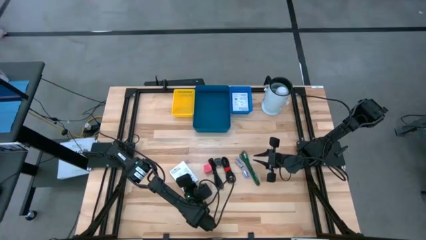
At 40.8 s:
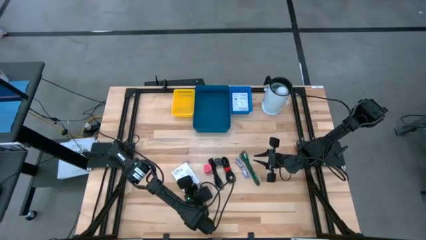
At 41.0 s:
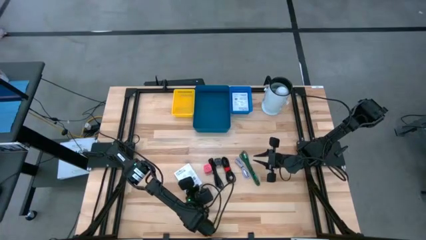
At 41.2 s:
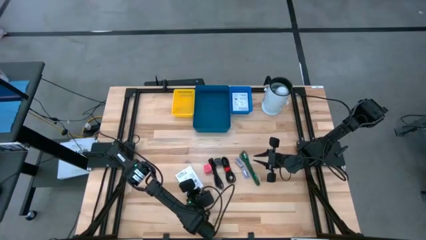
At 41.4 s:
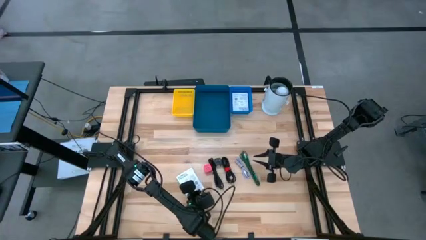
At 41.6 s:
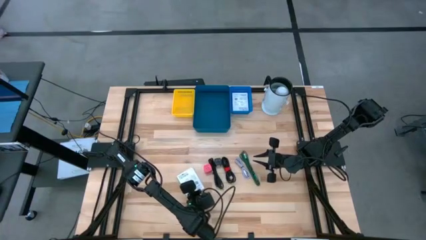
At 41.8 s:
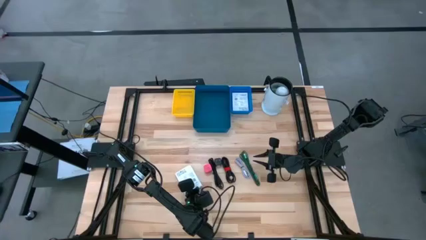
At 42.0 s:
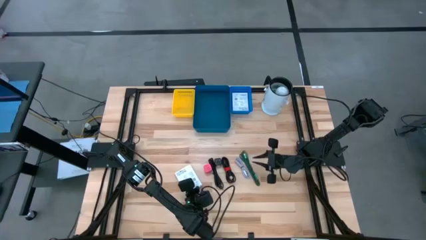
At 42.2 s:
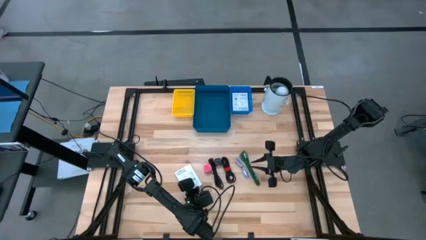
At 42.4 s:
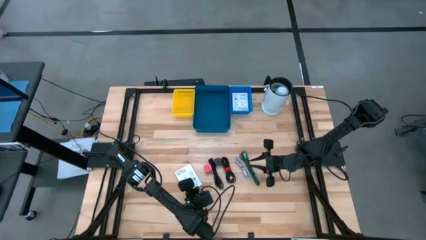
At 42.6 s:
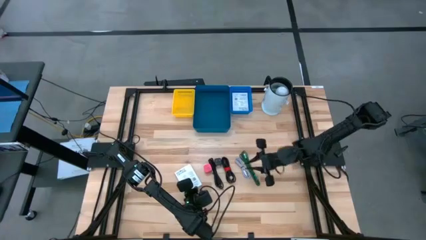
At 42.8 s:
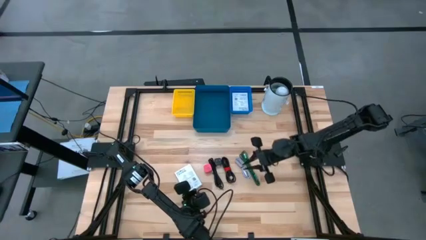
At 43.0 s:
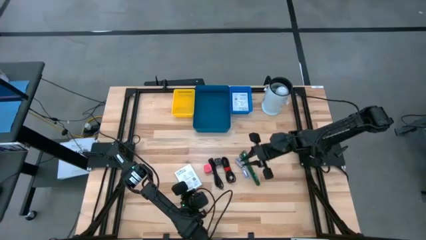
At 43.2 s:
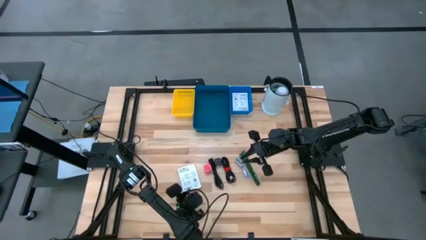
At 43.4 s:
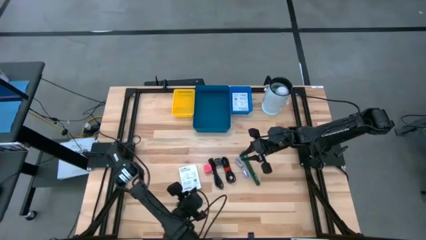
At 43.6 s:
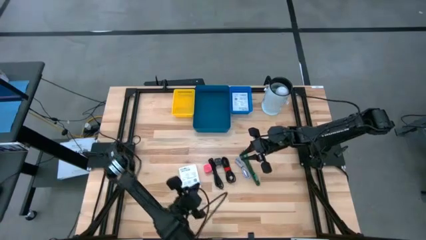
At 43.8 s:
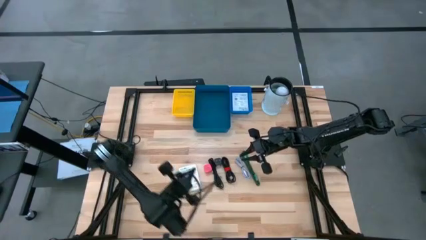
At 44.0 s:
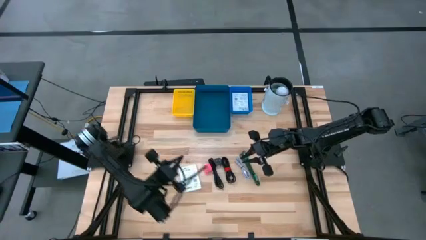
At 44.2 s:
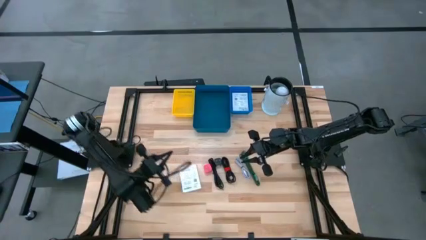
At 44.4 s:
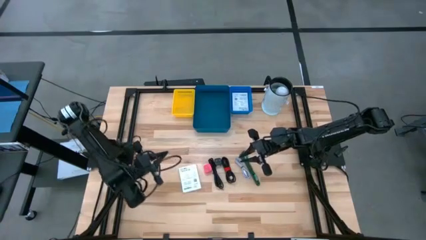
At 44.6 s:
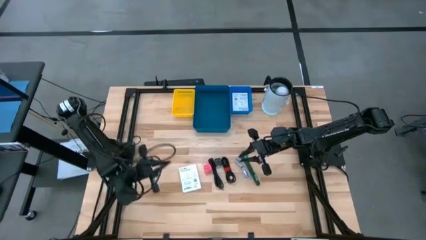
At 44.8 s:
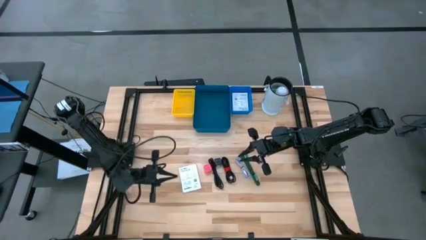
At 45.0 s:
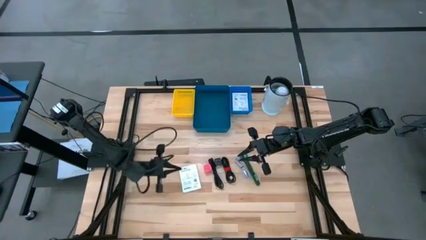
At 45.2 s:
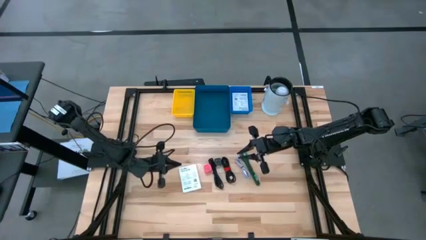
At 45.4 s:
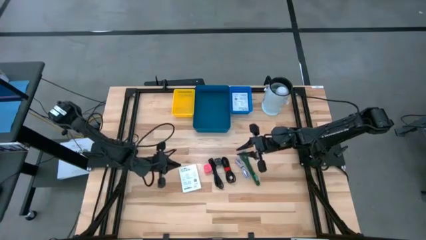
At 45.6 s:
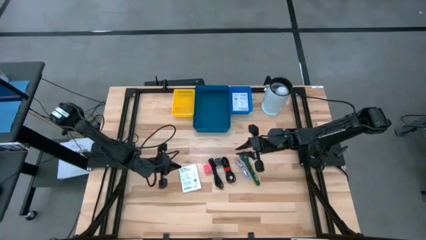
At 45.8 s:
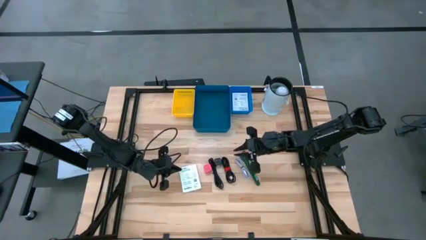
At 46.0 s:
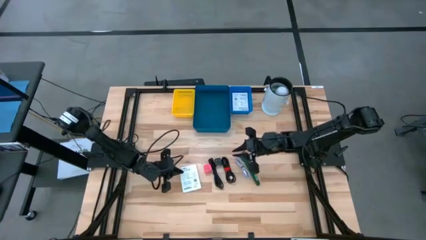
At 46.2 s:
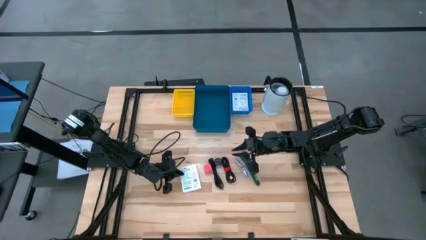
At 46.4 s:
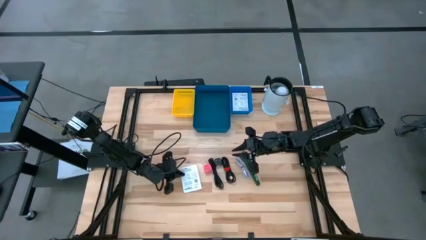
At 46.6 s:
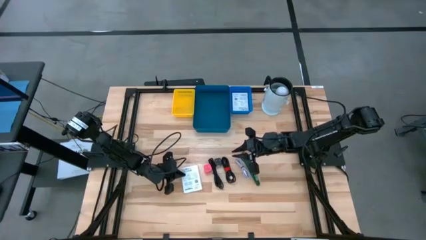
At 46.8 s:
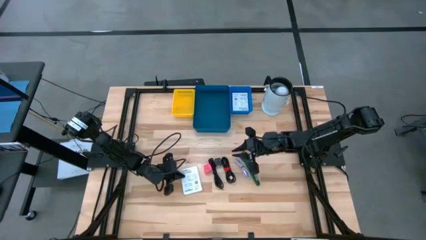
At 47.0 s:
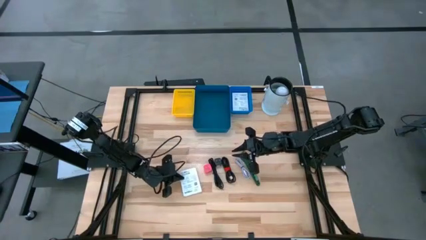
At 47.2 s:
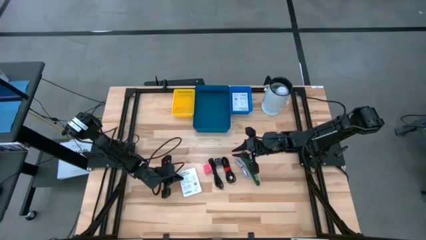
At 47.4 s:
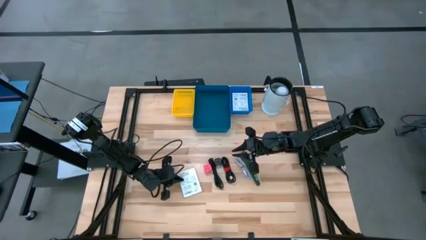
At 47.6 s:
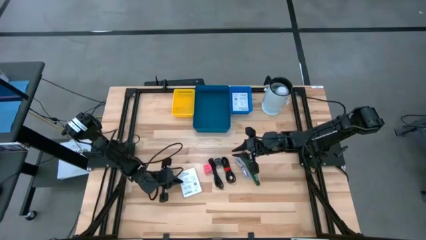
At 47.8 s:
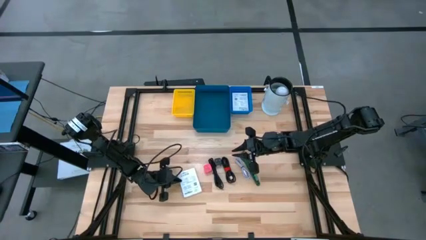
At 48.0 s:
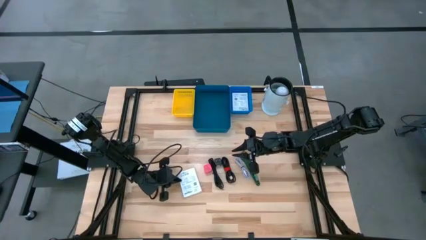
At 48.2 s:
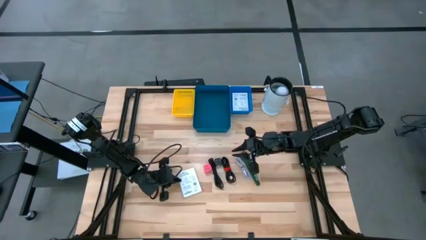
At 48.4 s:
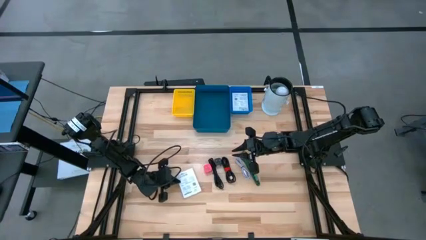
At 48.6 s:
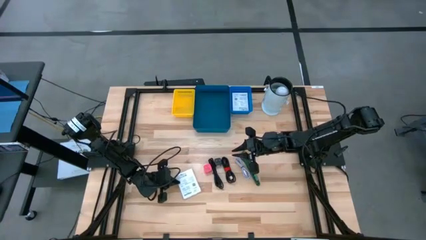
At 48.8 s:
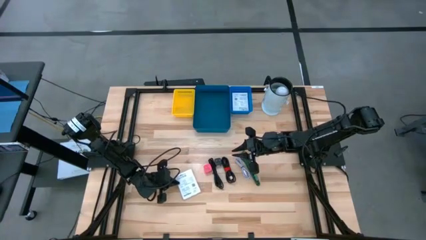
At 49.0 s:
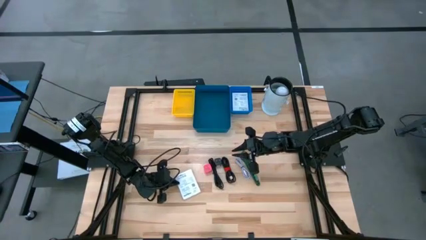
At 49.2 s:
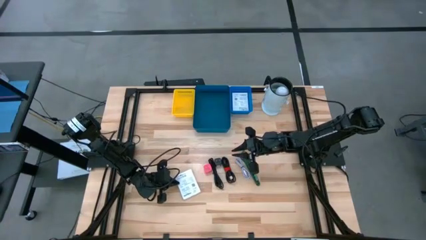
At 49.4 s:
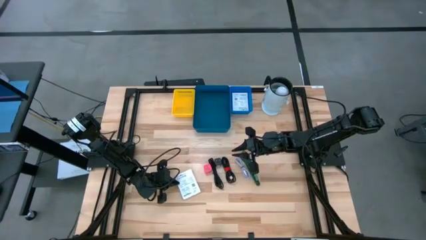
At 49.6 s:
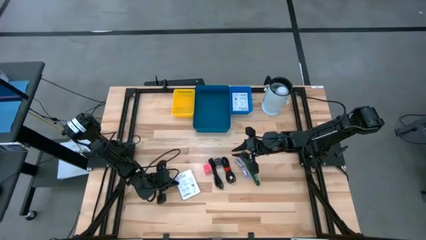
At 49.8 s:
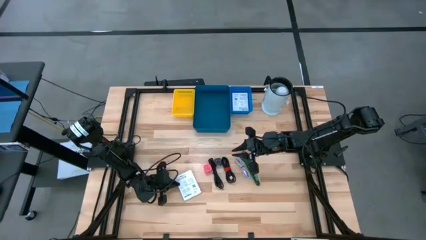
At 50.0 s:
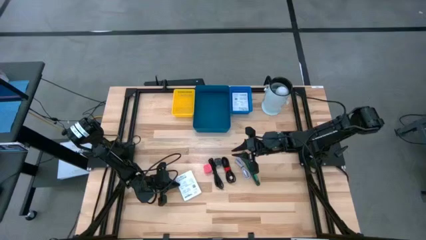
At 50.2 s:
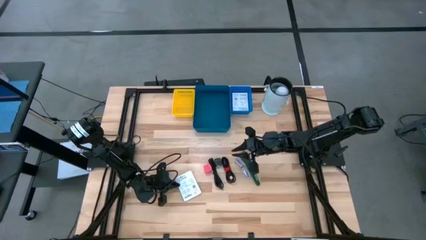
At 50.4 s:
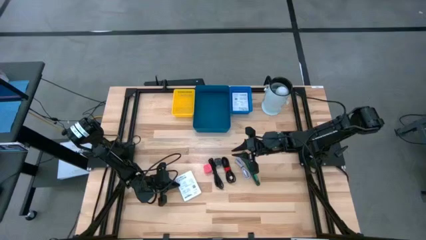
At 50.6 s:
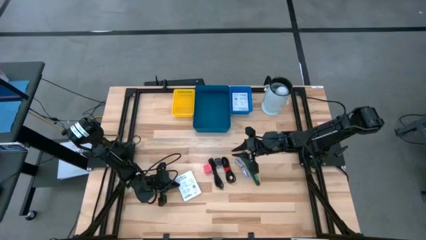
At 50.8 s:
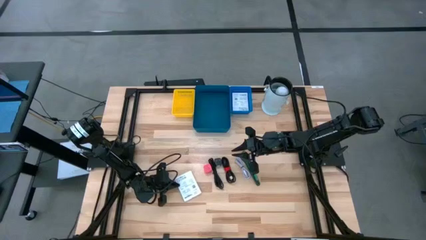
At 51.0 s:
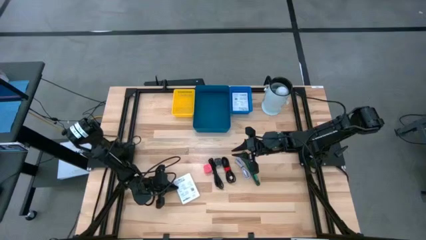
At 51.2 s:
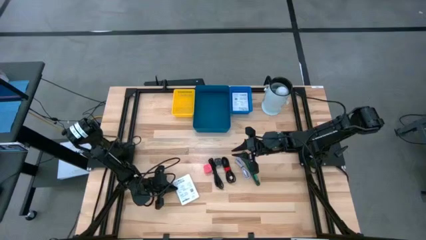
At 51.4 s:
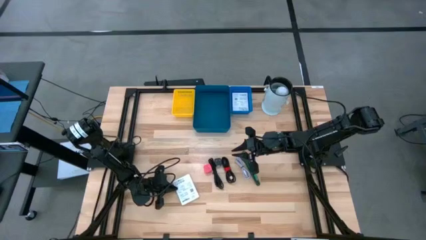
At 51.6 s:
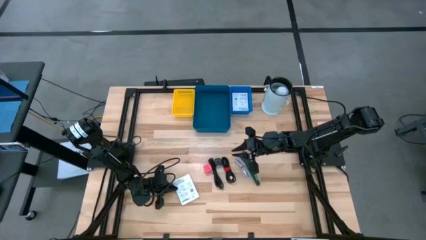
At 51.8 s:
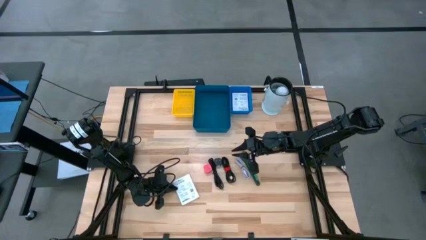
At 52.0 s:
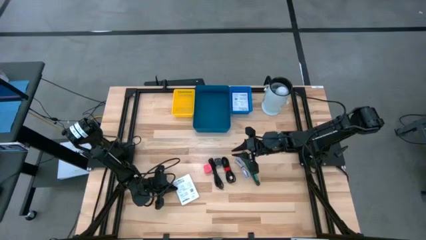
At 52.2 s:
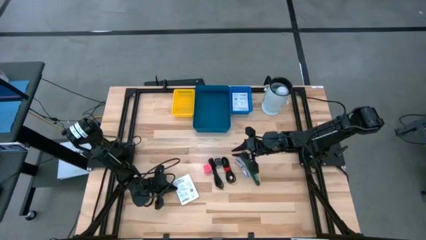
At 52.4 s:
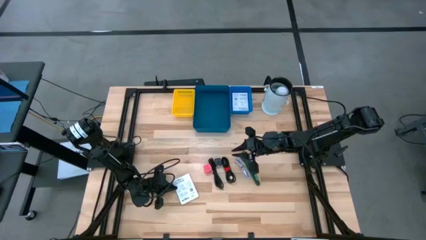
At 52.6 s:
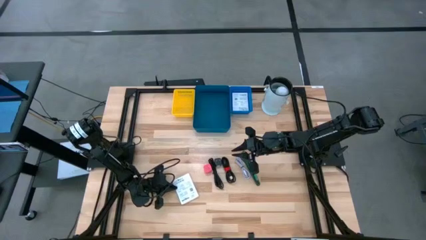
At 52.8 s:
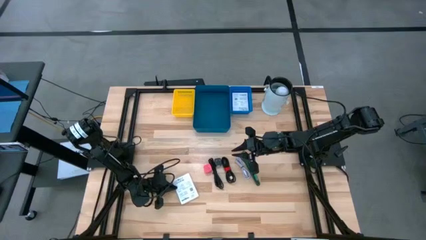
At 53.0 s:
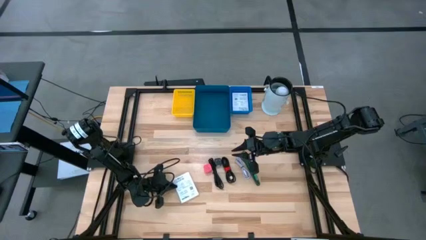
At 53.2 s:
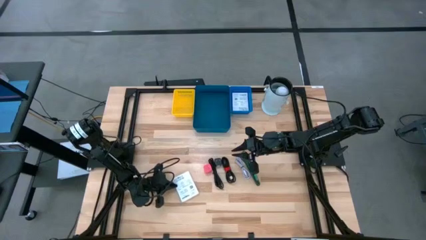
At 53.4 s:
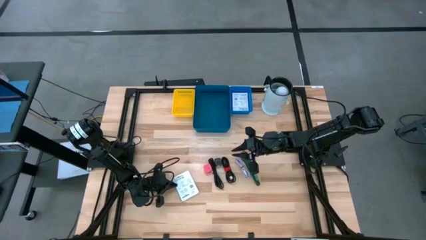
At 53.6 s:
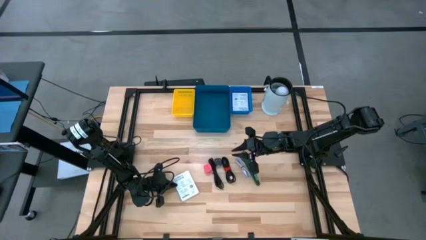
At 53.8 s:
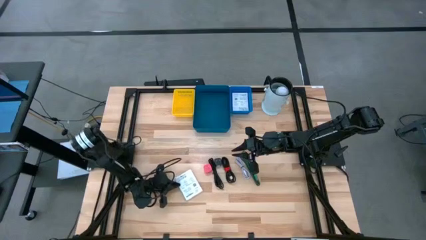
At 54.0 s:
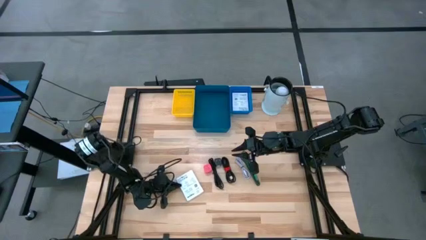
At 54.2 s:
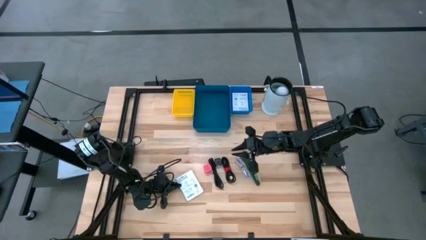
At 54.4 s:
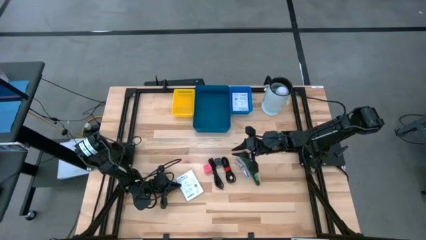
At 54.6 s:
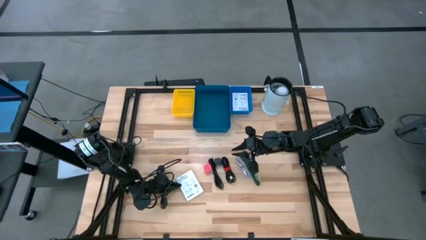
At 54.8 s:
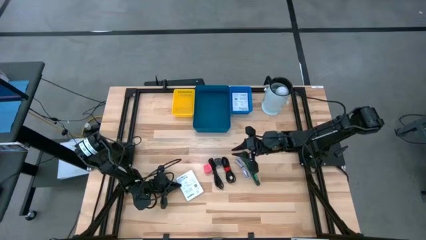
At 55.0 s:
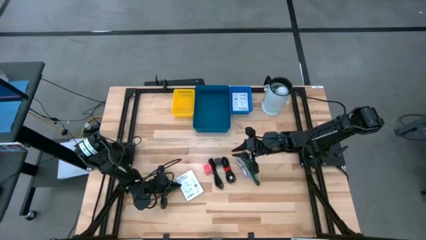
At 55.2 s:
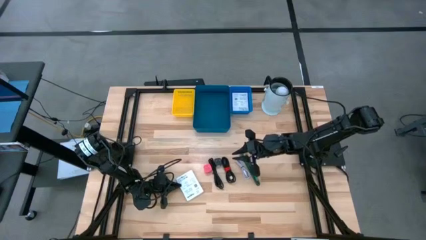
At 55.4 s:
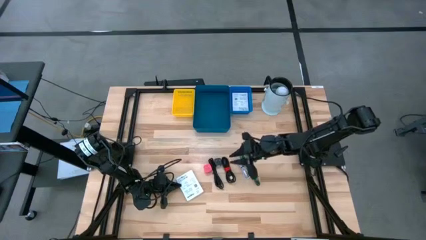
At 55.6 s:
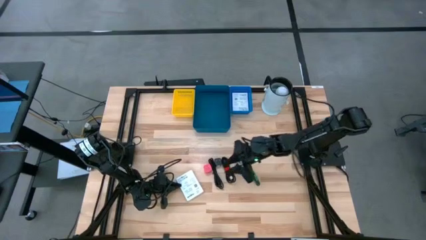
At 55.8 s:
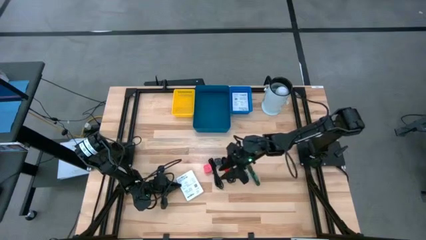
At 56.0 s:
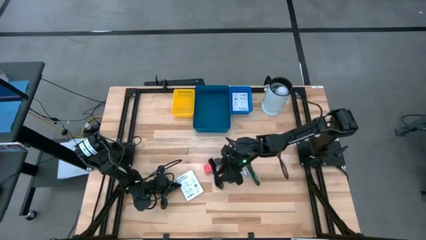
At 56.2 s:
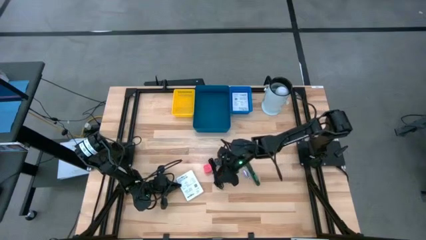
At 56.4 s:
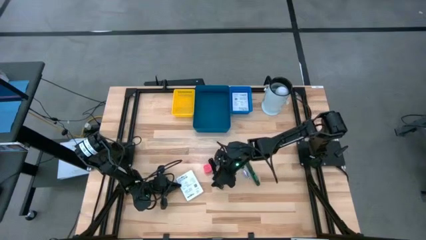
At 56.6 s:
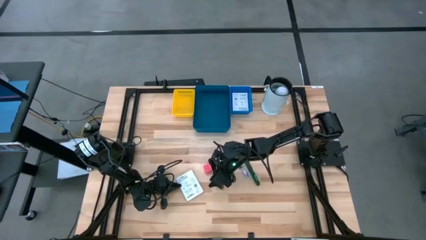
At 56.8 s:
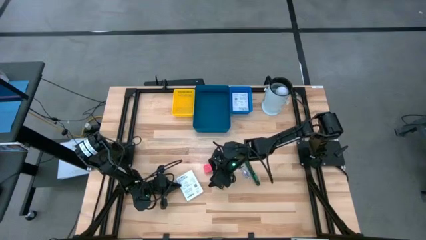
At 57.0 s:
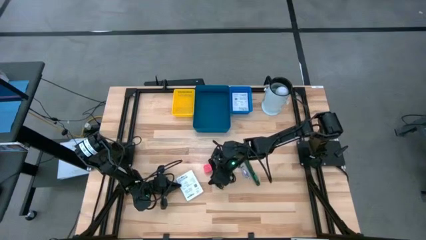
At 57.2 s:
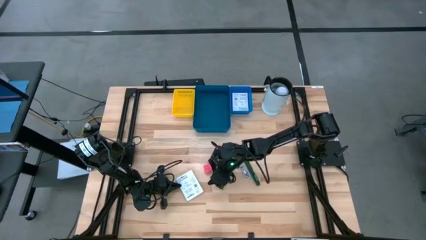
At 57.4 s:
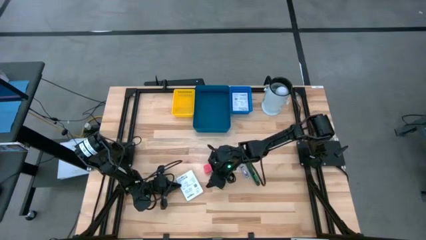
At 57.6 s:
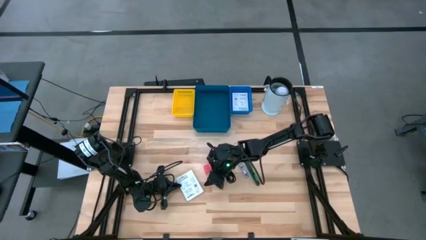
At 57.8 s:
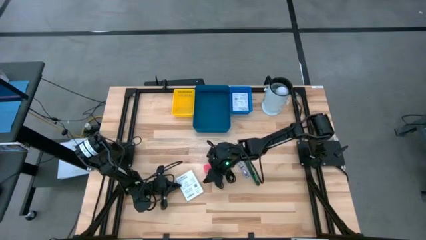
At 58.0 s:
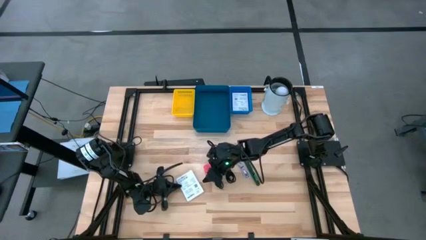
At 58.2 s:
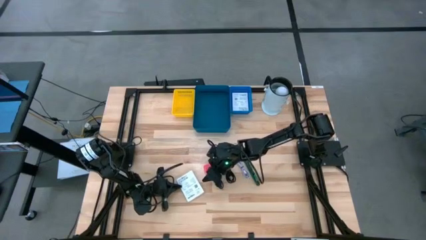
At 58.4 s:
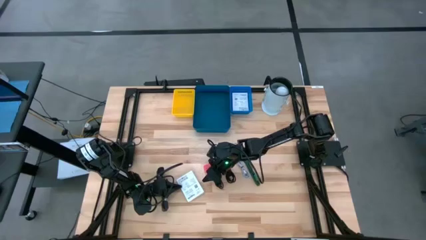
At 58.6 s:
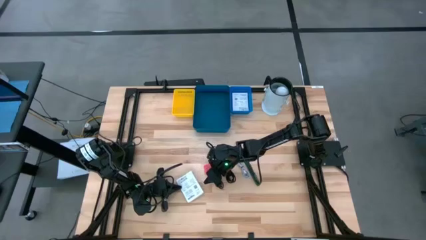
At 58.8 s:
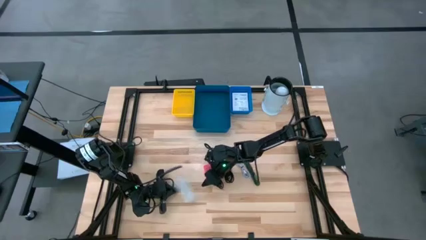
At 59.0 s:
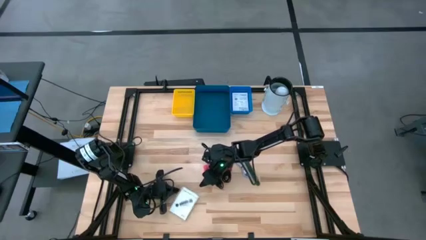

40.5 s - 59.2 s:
Task: Pick and place items into bin
Put the white card reader box into the blue bin
